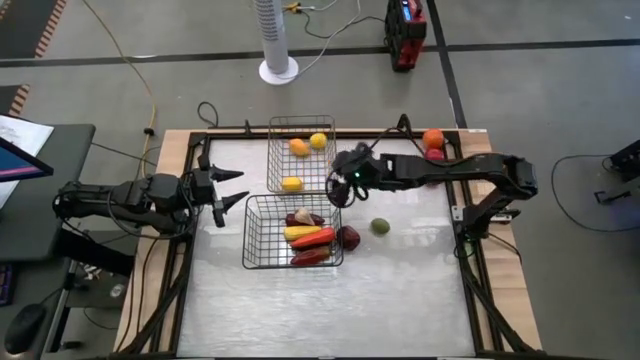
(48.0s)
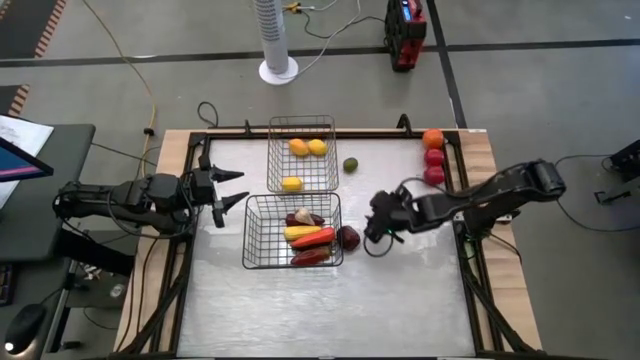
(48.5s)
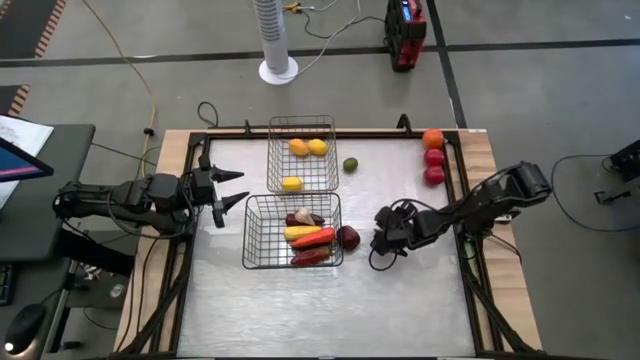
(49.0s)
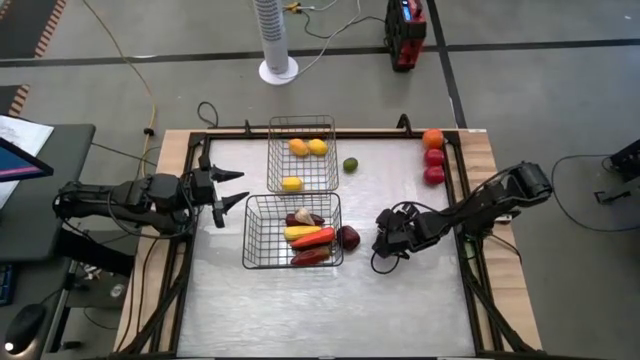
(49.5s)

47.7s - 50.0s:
Task: Sort produce into baskets
Put the bottom lime into the gold wire basket

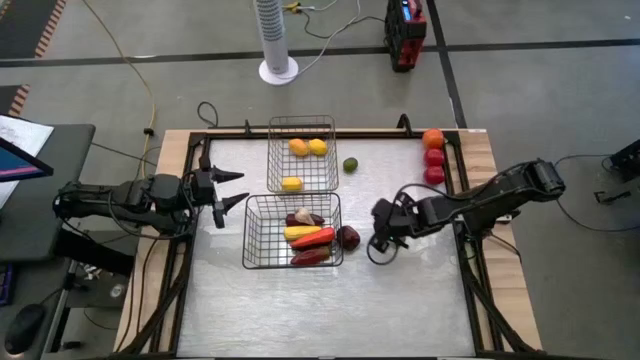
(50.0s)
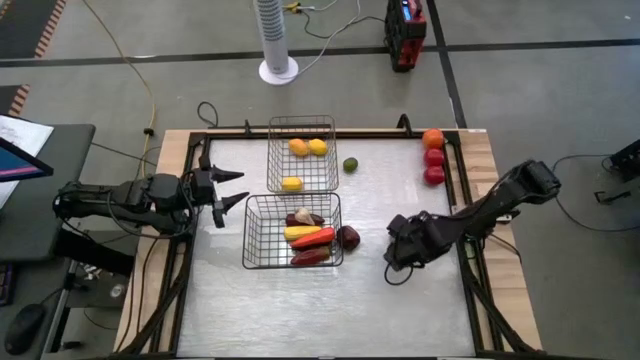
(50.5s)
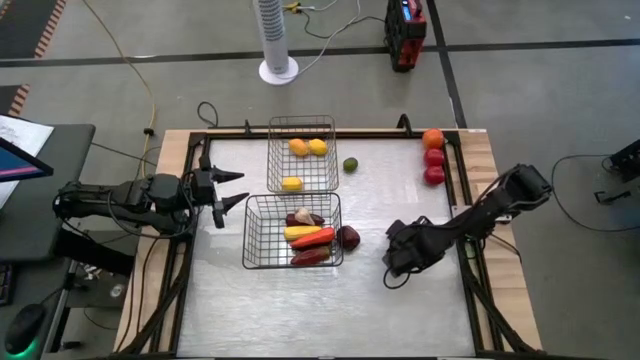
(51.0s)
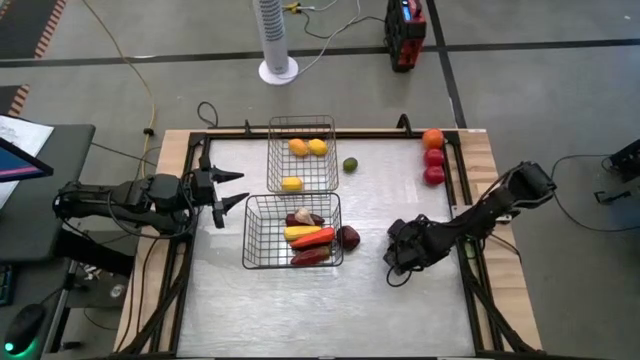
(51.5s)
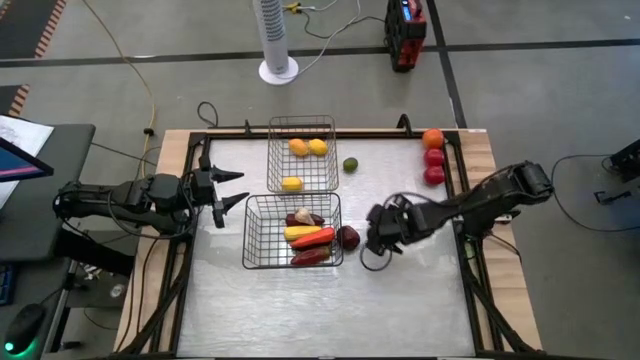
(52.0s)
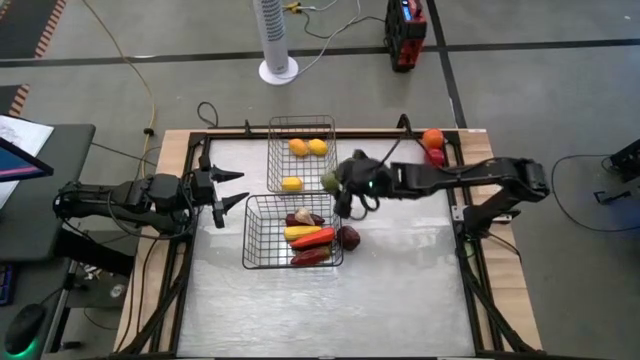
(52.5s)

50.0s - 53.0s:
Put the bottom lime into the gold wire basket

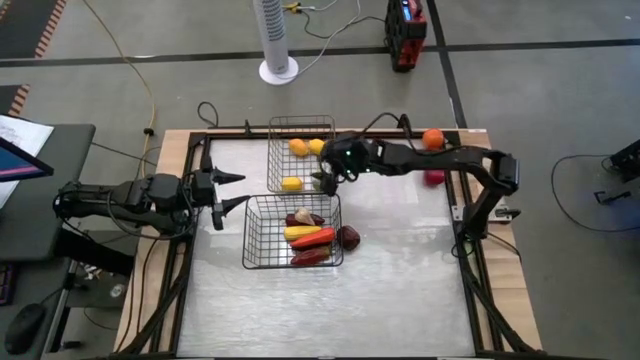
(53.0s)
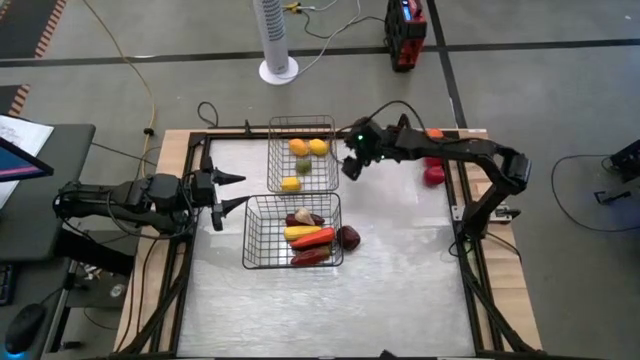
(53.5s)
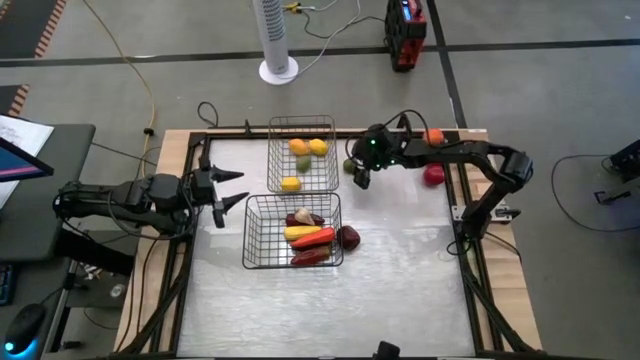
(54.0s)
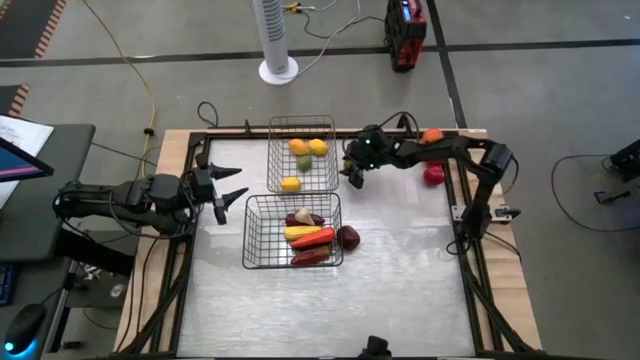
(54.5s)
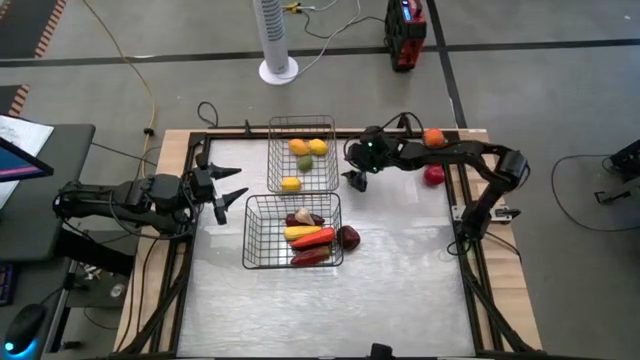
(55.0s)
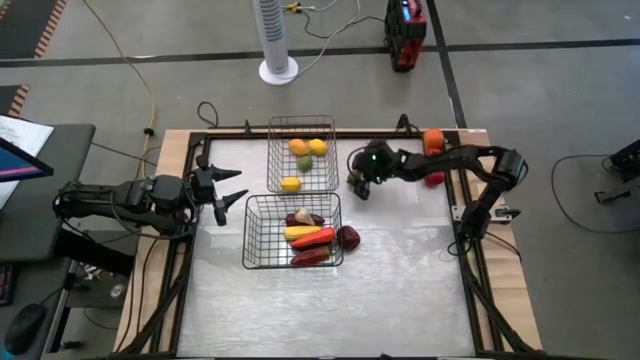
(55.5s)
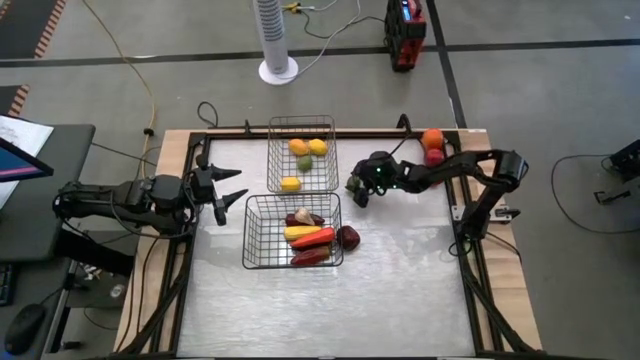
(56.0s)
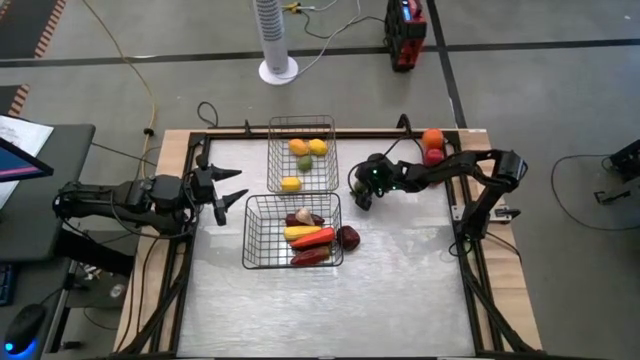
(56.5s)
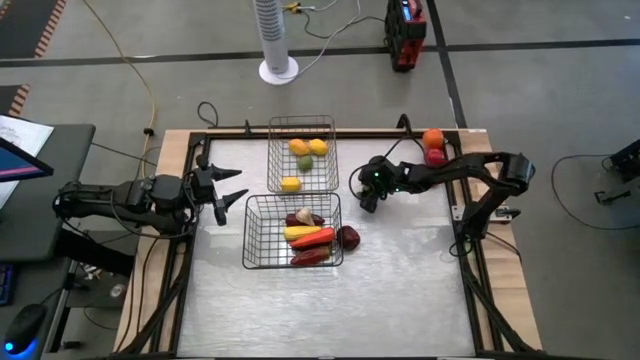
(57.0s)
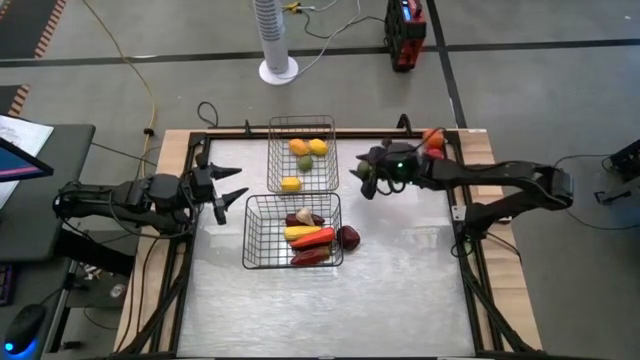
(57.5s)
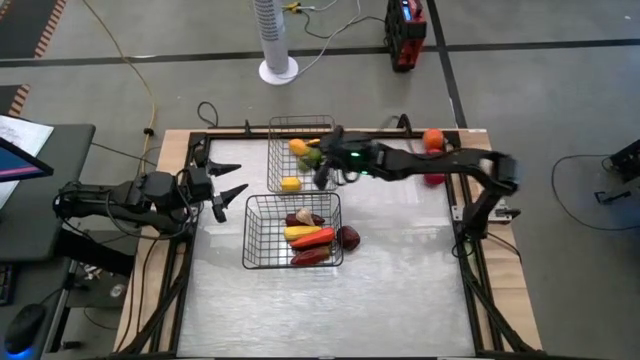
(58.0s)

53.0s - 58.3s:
Put the lime into the gold wire basket

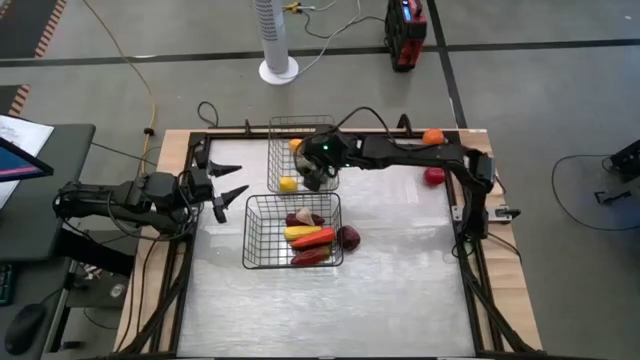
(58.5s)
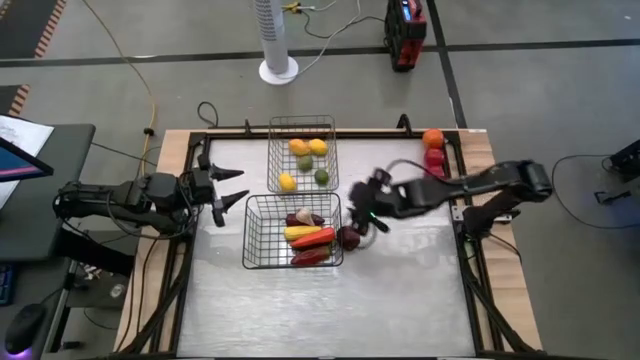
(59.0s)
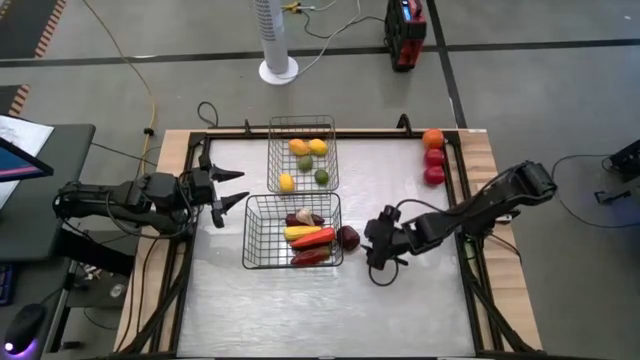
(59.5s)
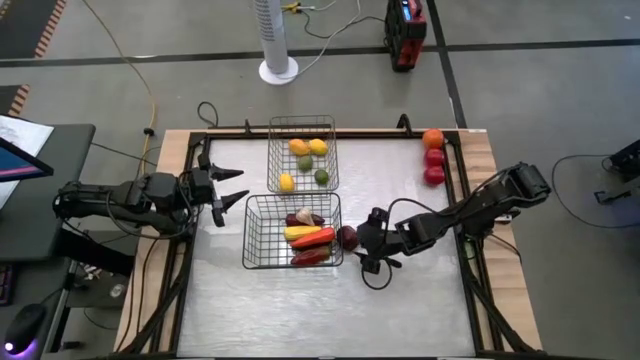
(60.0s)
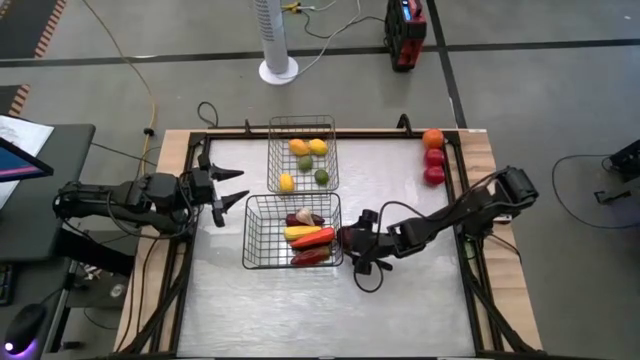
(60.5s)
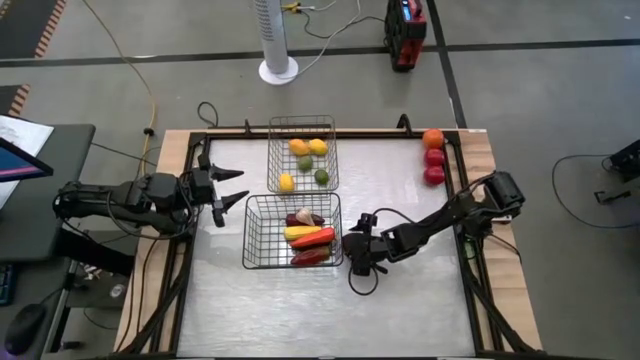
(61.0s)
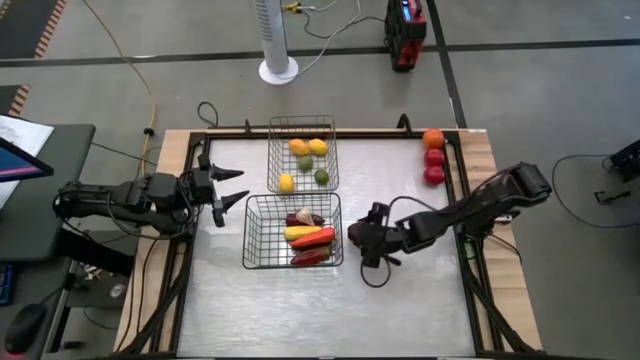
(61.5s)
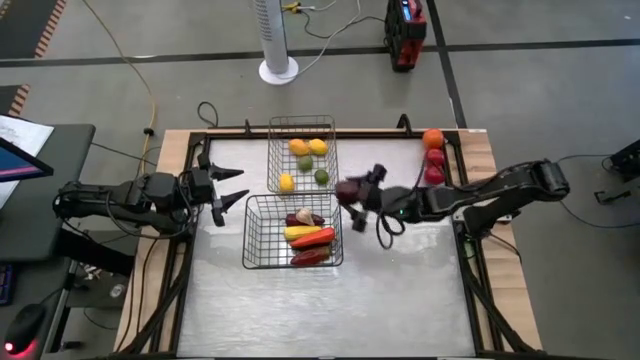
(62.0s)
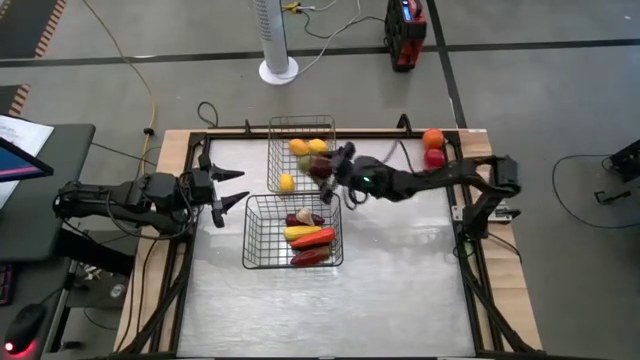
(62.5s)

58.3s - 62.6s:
Put the apple into the gold wire basket

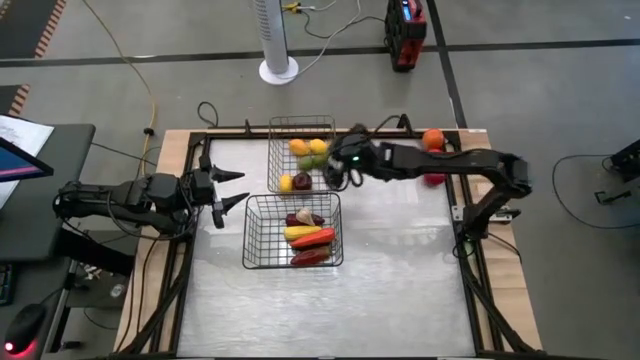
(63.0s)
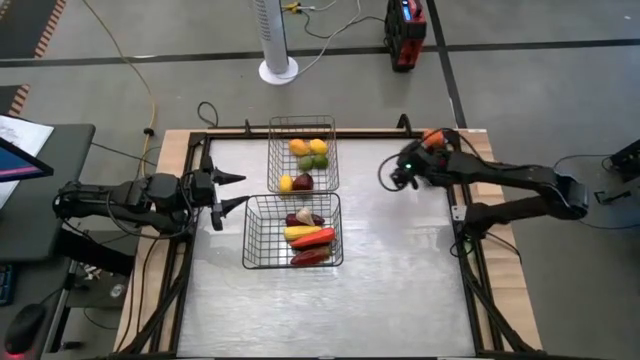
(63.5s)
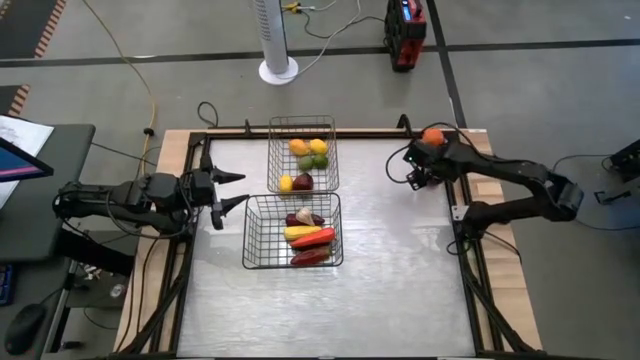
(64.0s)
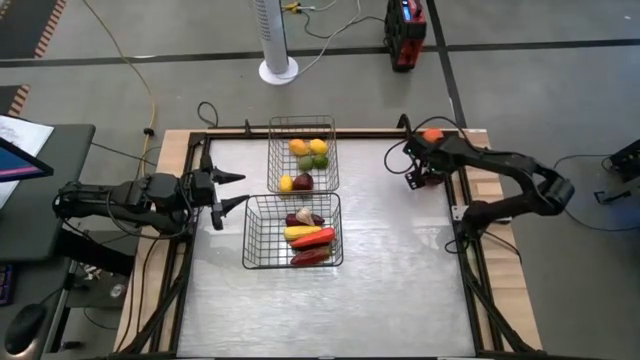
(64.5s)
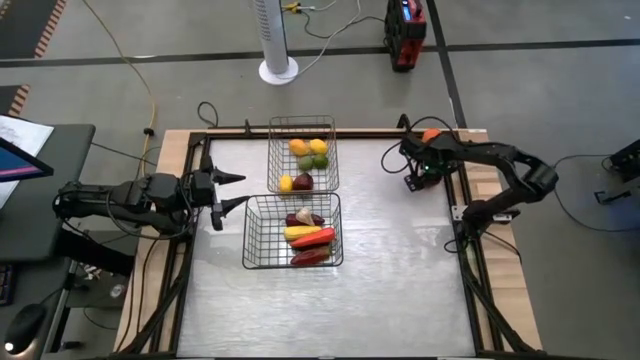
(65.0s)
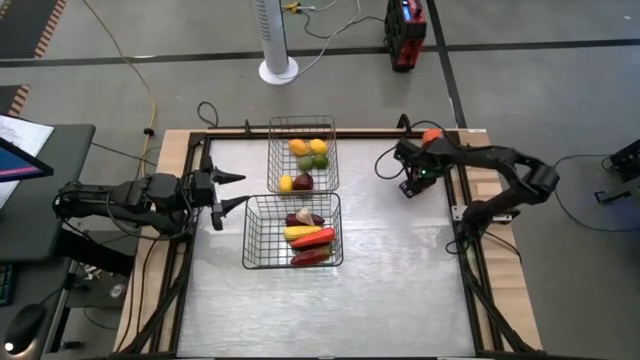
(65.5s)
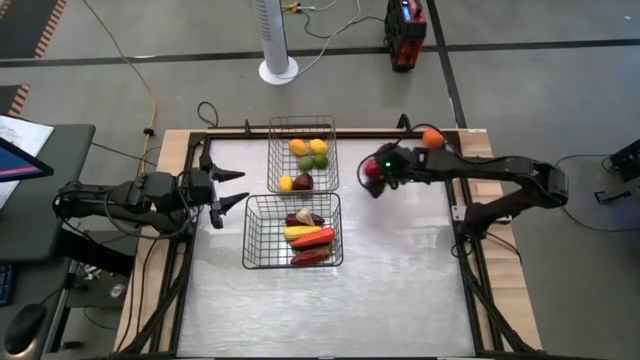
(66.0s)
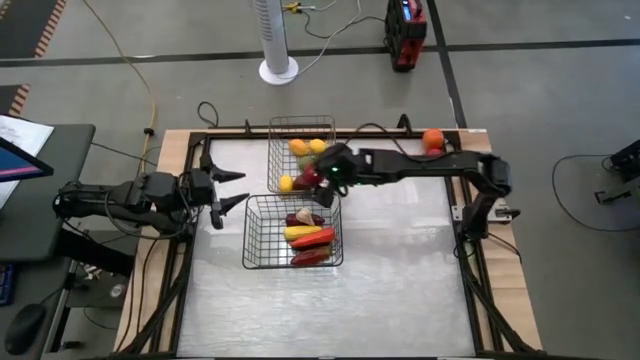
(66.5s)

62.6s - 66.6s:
Put the bottom tomato into the gold wire basket

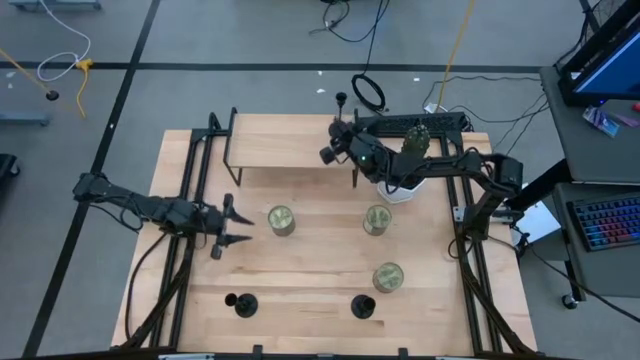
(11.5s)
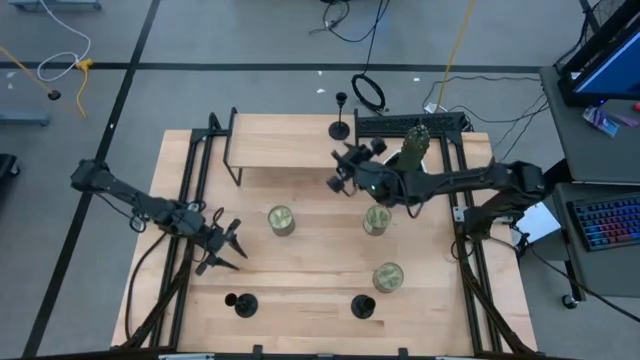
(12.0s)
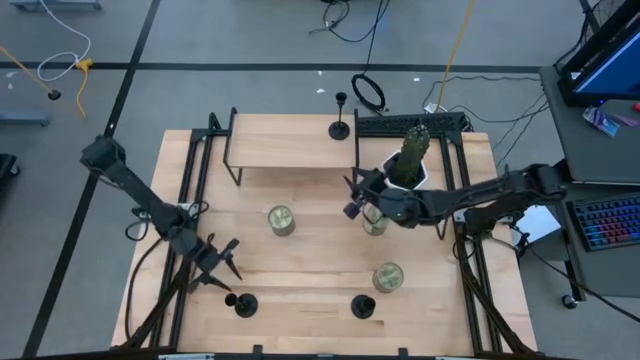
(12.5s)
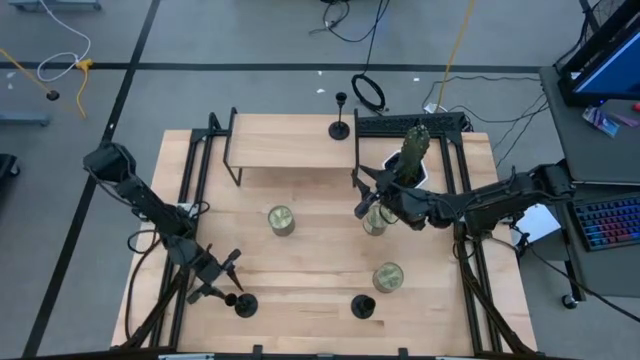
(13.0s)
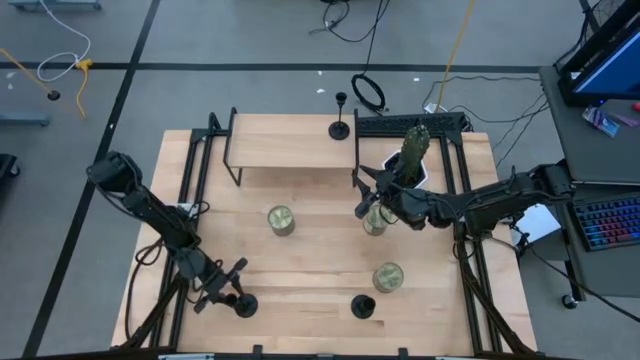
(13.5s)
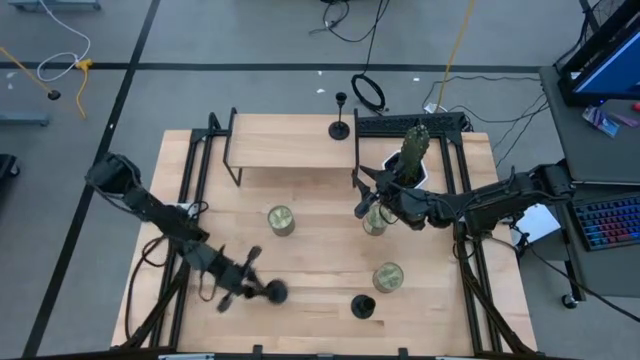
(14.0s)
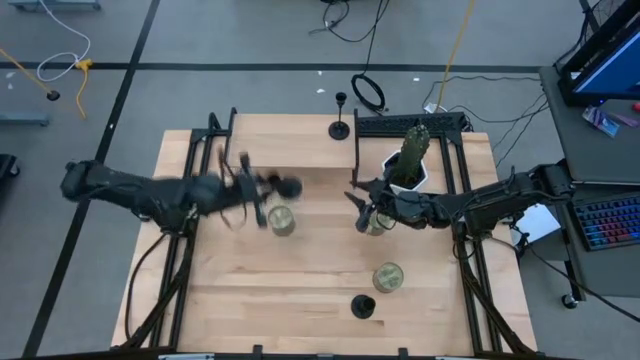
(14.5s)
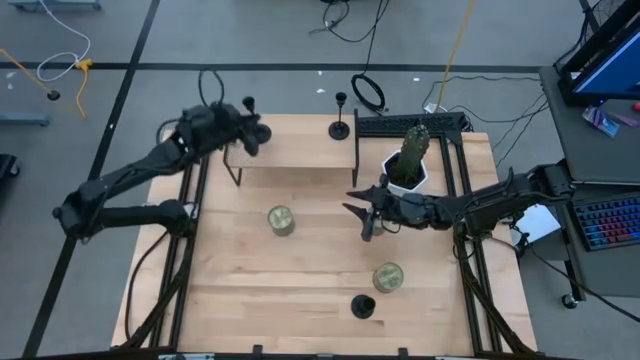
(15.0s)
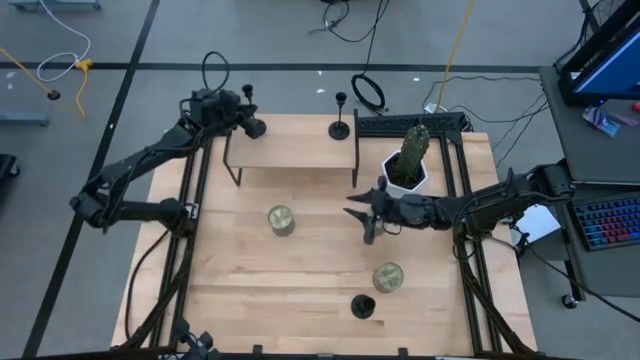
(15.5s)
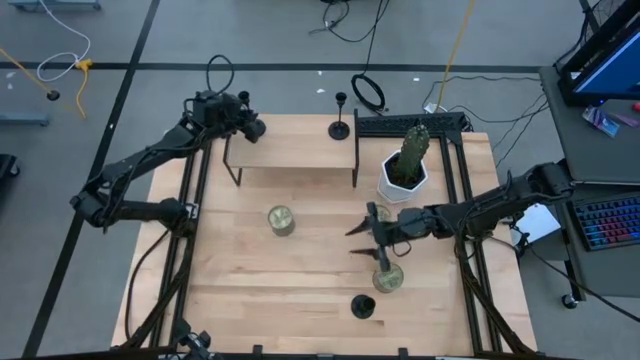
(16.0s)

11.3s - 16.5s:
Task: Pick & Place candle stick holders
Put the black candle holder on the shelf
